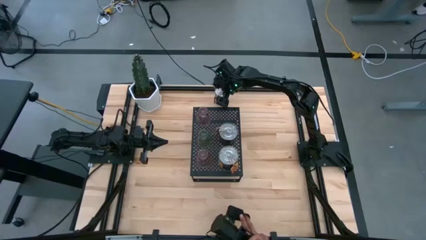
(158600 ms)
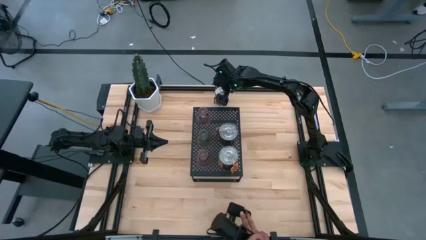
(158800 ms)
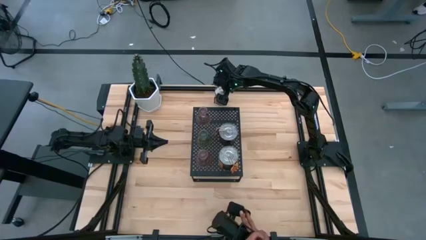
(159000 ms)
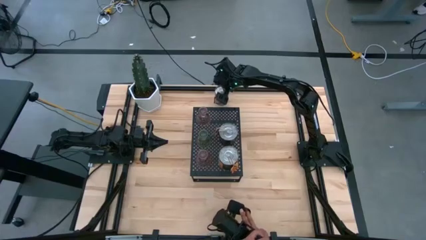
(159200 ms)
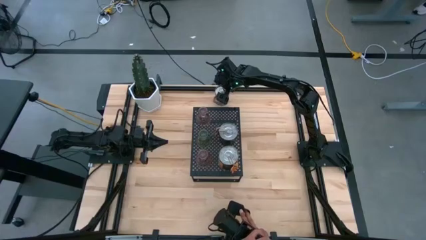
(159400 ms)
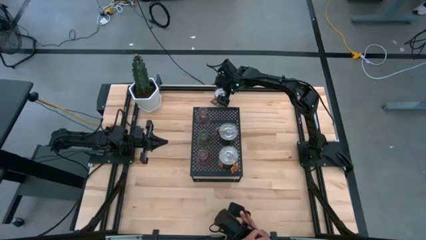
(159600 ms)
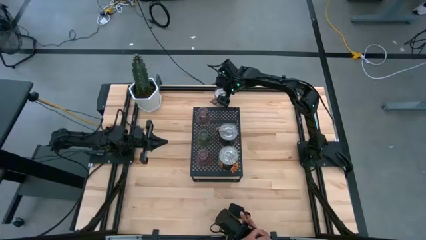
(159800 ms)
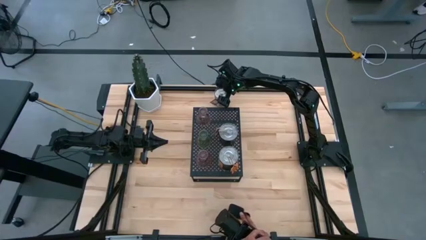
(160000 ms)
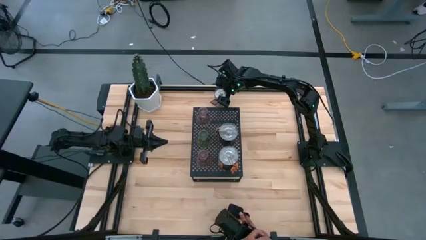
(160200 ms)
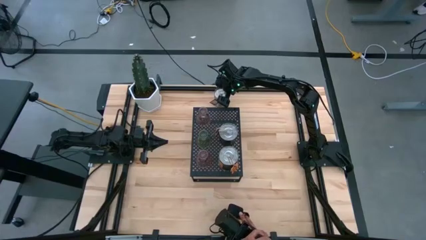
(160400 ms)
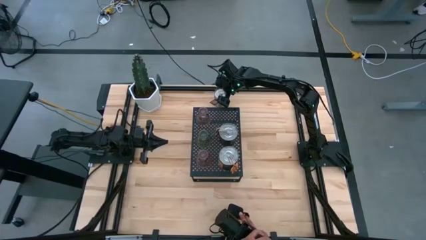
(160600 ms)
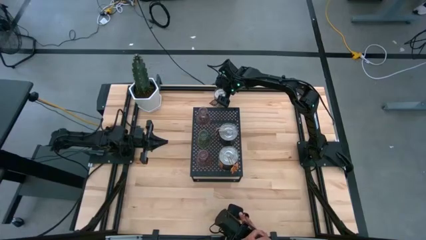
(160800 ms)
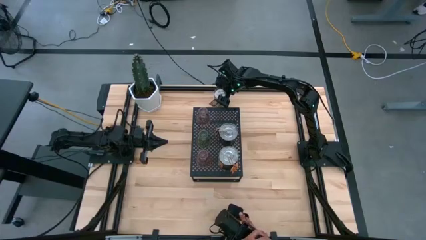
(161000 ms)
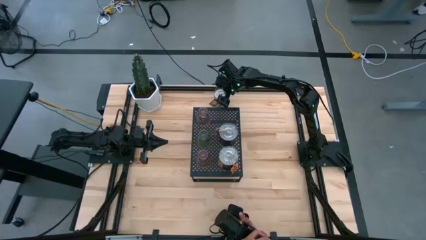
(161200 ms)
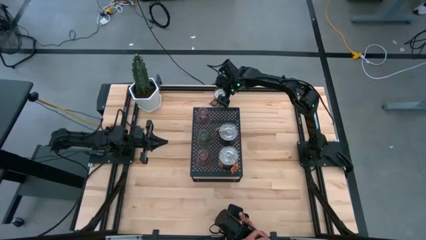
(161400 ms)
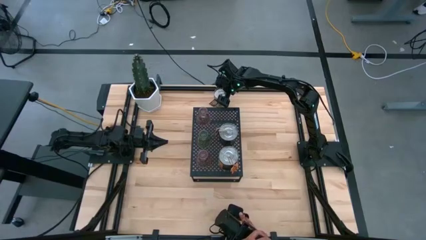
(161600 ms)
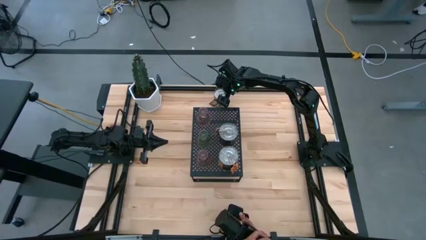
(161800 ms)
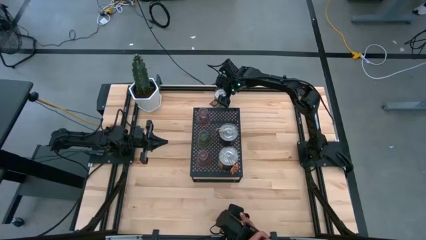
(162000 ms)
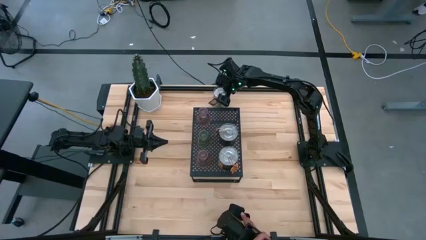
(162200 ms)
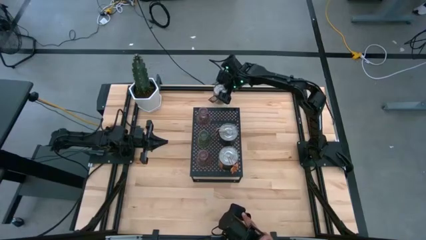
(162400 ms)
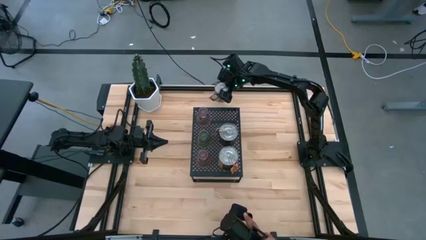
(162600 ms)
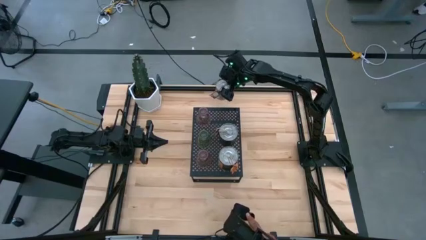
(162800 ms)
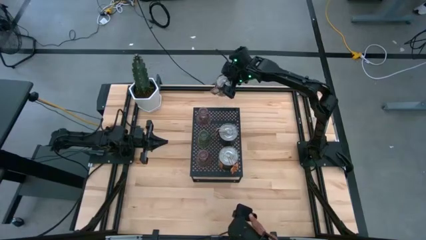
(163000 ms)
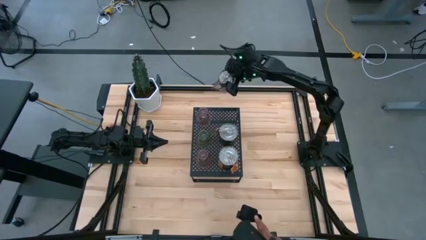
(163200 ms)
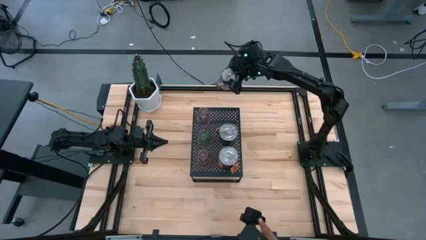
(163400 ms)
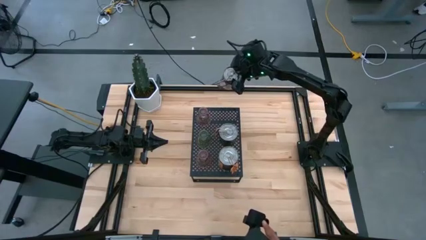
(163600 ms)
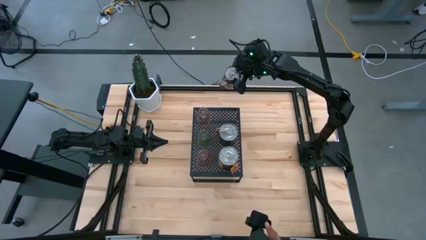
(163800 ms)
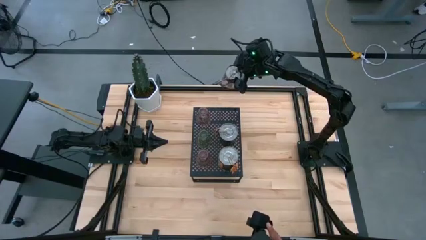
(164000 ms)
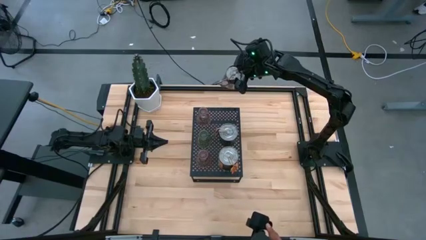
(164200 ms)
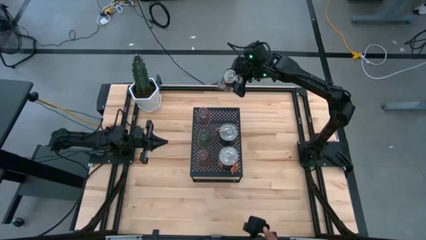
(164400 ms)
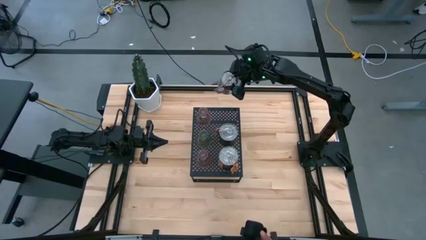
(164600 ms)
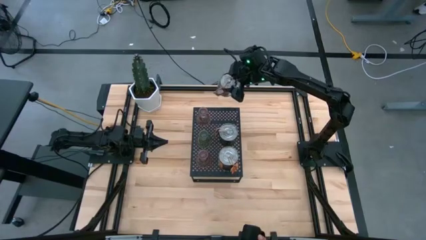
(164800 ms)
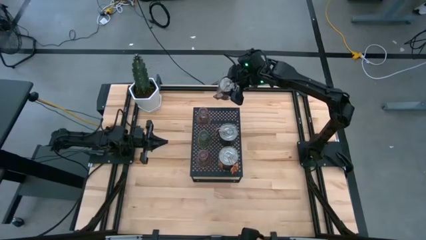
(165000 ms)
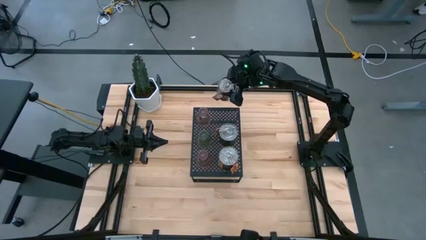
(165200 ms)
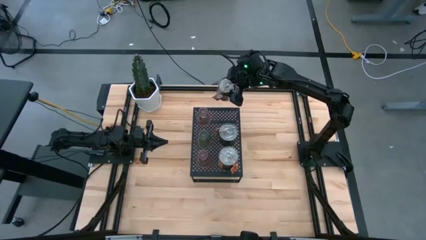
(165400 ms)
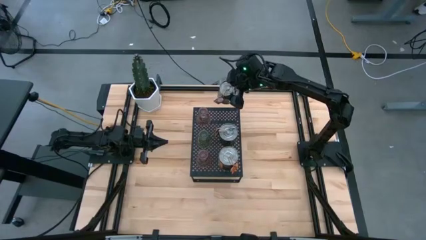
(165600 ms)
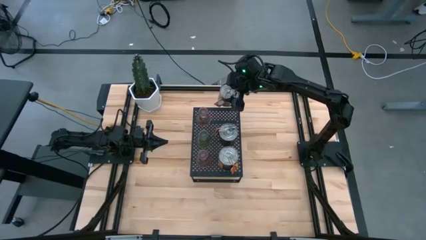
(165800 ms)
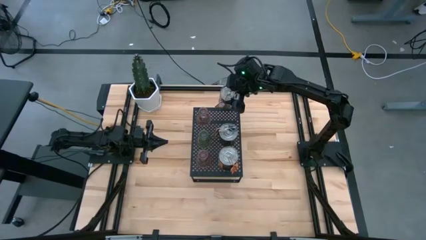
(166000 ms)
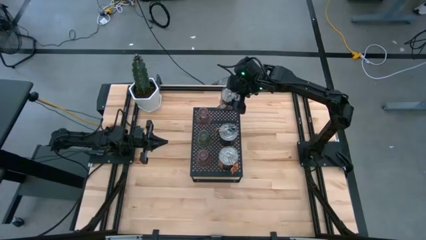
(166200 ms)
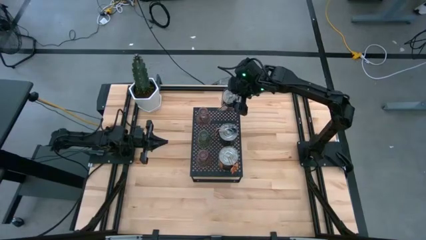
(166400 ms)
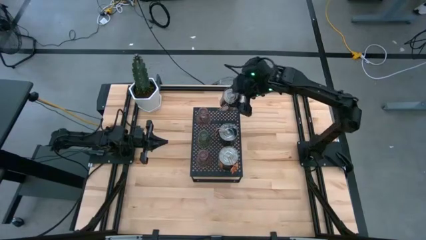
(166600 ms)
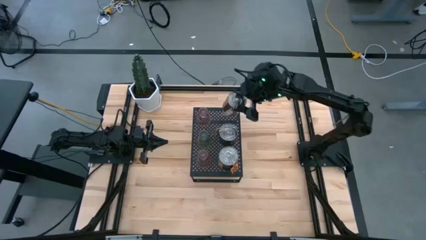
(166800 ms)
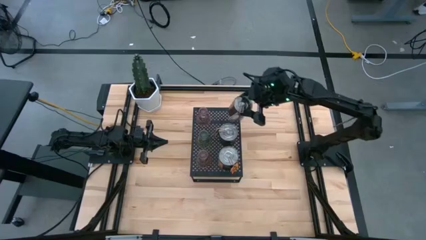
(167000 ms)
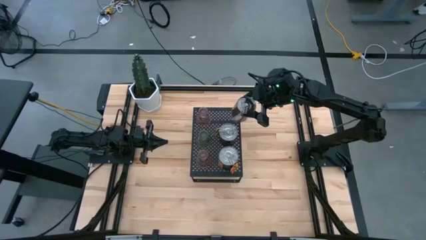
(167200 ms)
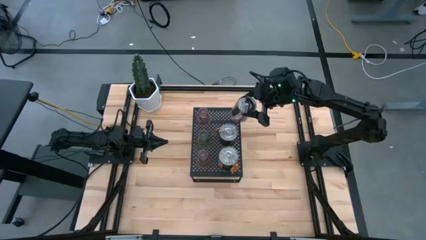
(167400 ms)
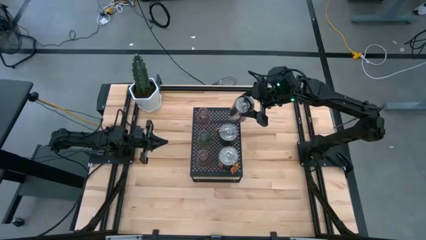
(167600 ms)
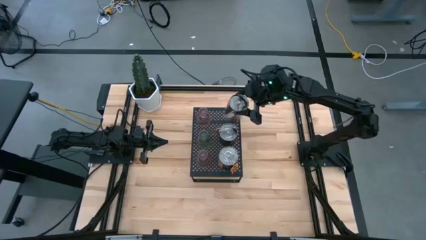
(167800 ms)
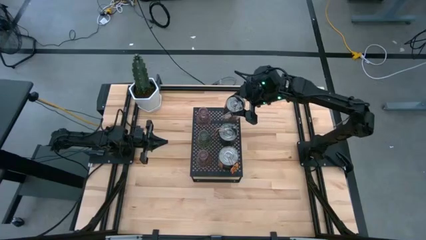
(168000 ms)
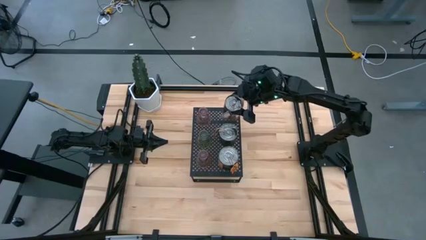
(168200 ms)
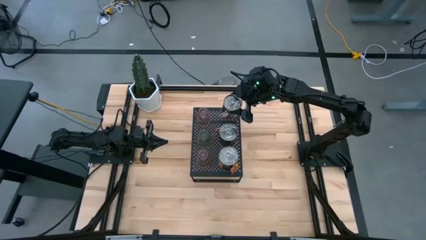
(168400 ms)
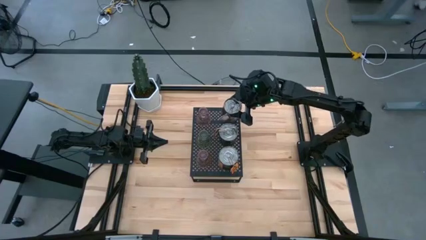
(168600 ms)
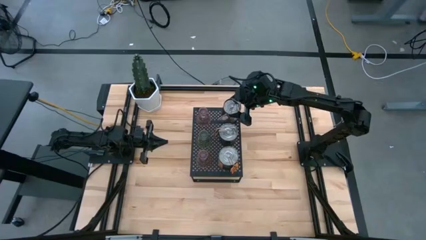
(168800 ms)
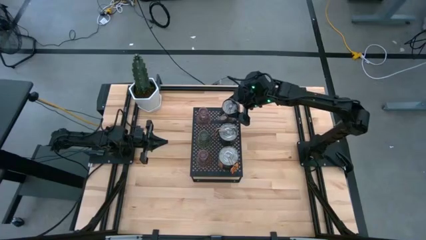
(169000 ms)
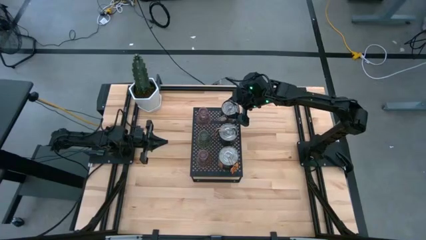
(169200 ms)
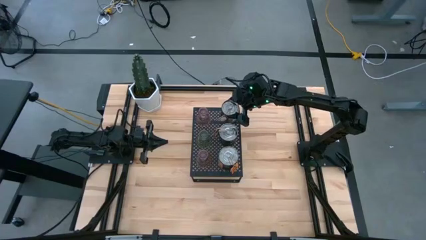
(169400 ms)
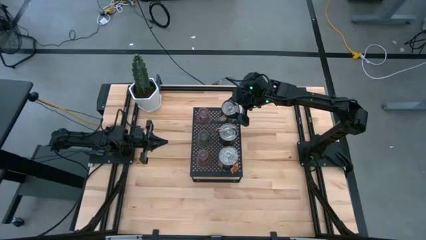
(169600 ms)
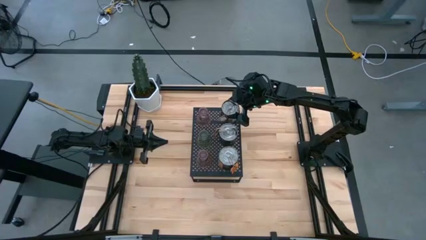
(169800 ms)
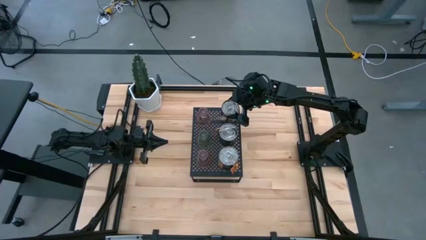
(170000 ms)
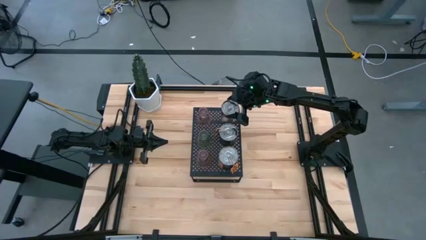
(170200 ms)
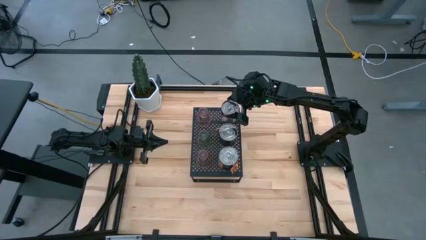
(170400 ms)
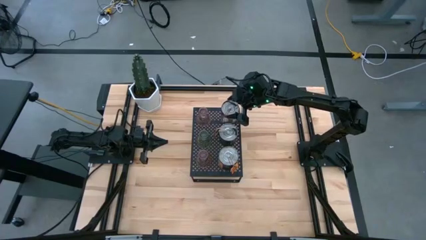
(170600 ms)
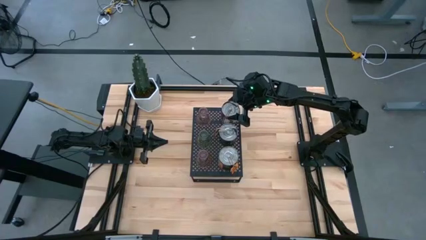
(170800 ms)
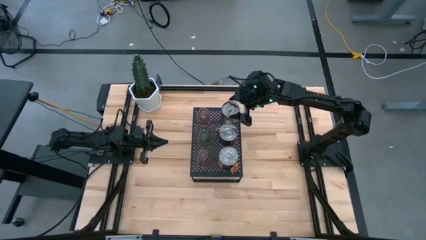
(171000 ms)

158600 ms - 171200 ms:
Task: Pick & Place candle stick holders
Put the brown scented candle on the shelf

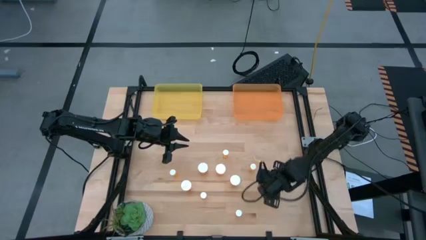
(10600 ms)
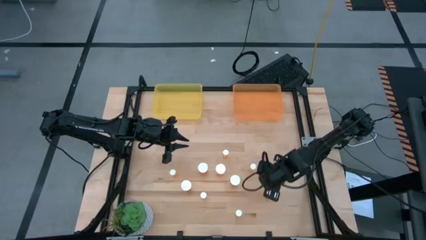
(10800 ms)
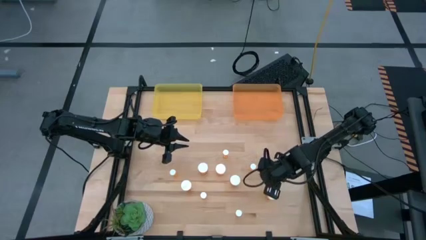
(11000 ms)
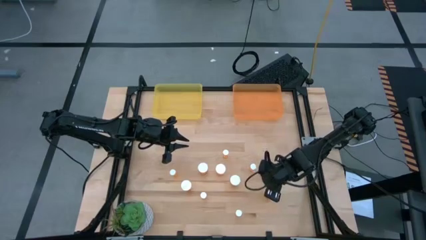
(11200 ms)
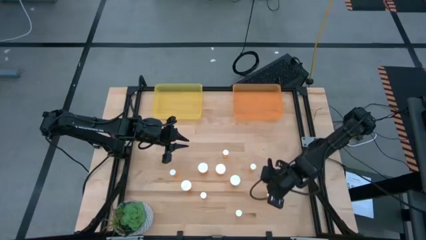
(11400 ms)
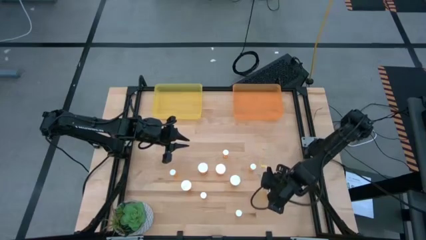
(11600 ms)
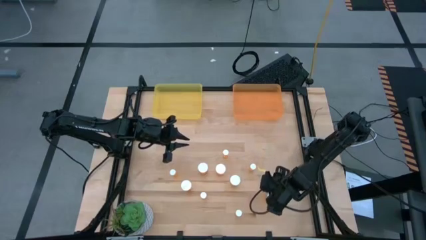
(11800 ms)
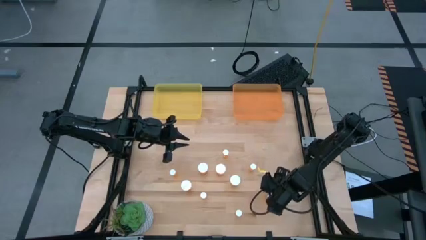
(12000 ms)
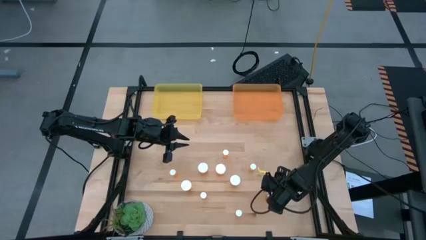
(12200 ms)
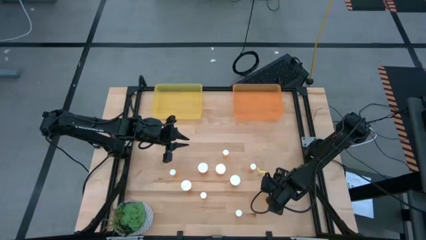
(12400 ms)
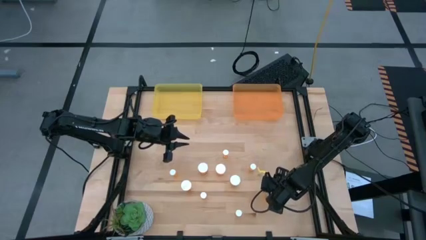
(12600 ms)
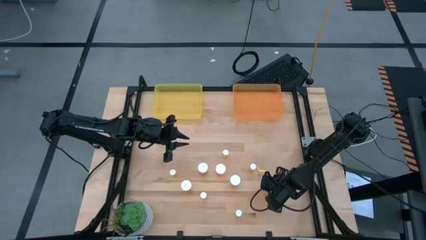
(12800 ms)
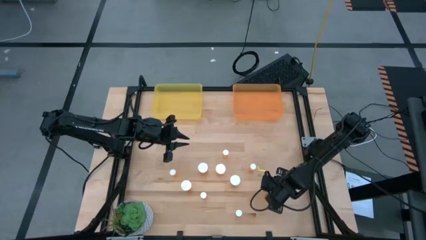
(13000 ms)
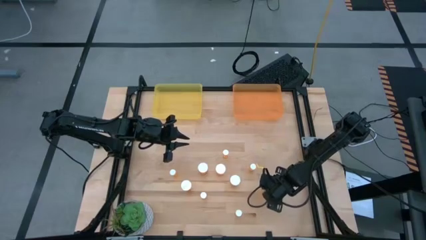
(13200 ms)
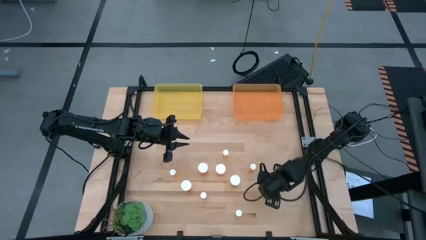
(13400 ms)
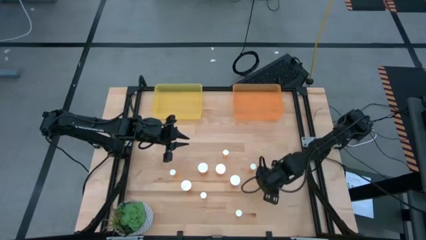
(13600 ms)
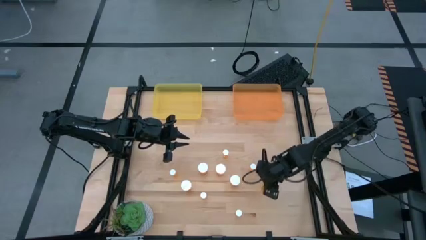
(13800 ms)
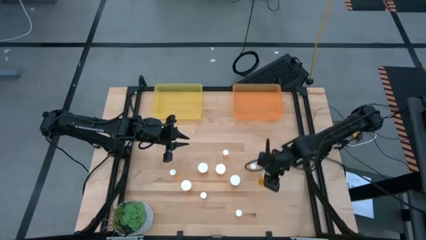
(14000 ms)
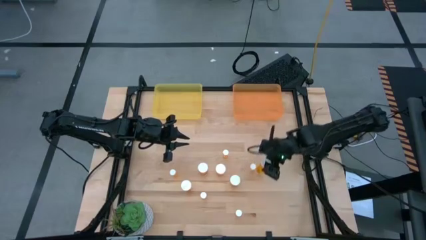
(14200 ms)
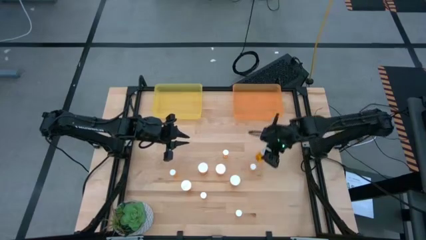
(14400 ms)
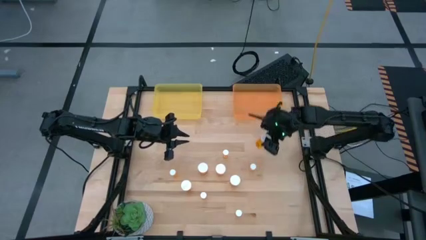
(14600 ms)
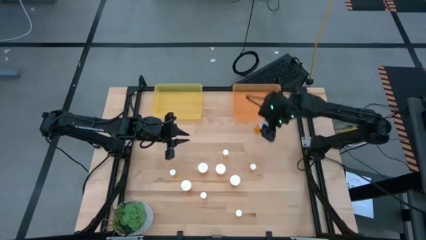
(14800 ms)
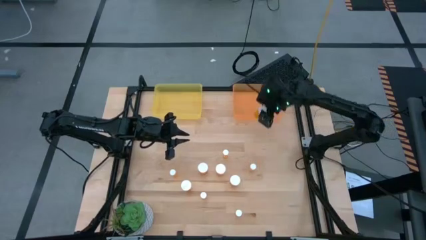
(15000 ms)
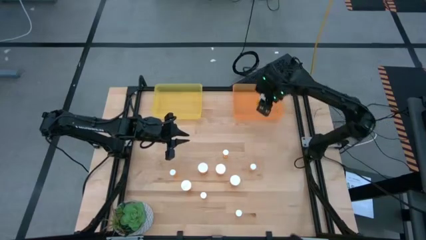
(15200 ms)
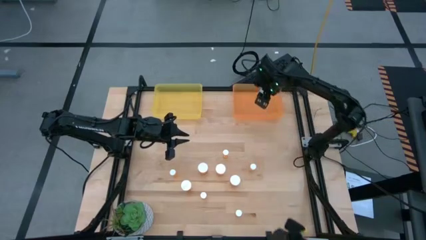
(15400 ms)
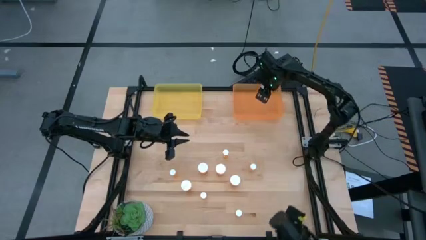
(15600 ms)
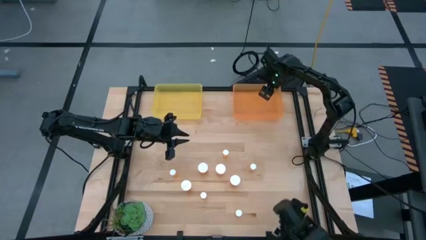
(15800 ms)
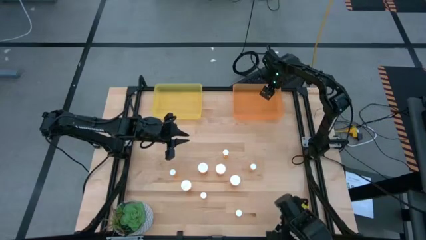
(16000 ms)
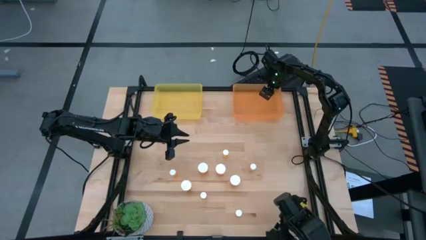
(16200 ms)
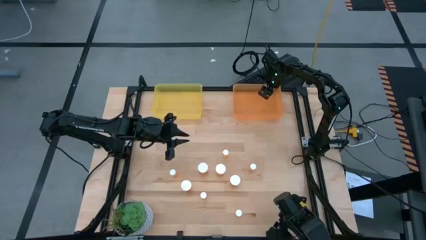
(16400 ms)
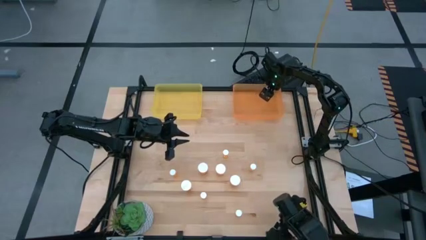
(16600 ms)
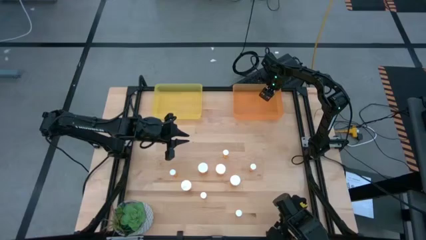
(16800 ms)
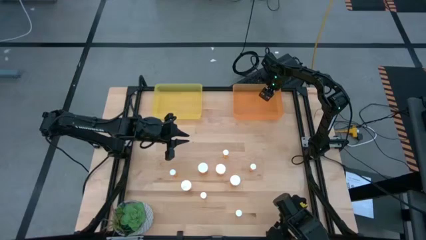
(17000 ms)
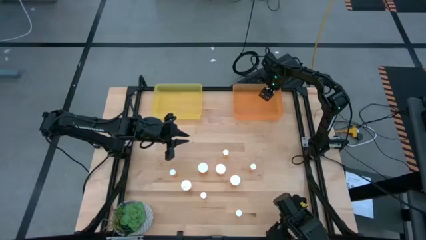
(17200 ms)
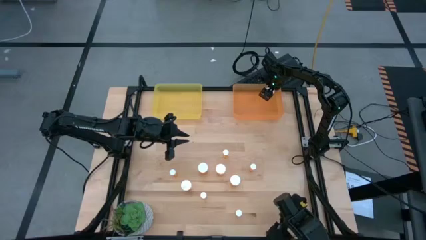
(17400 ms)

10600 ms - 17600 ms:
Task: Pick and place medicine bottles into bin by pill shape (circle, oval)
Put the big yellow pill bottle into the transparent orange bin
